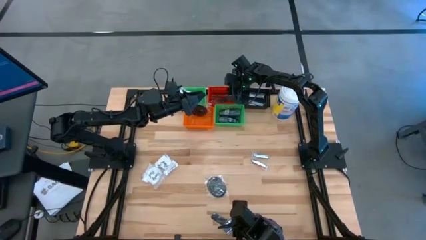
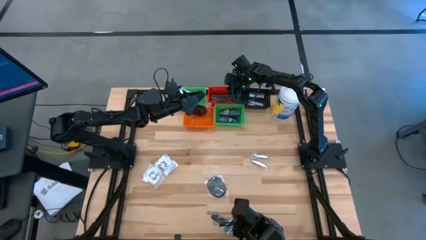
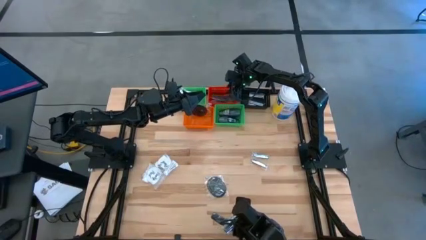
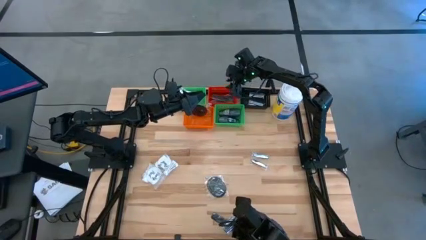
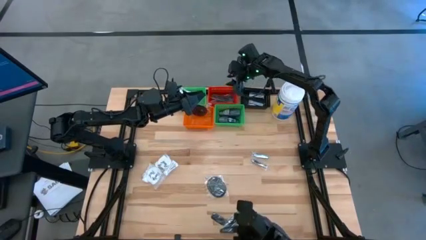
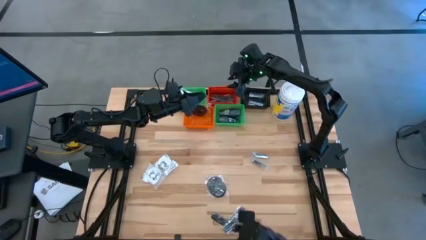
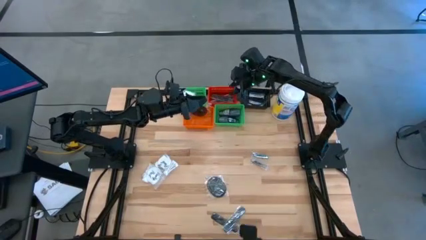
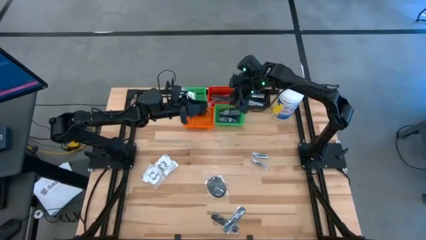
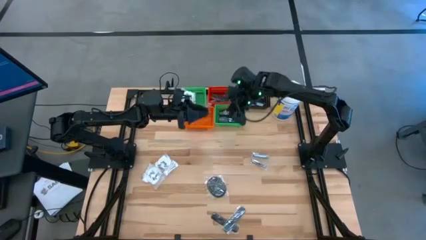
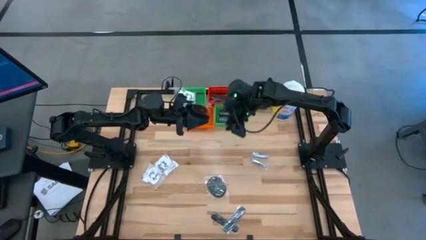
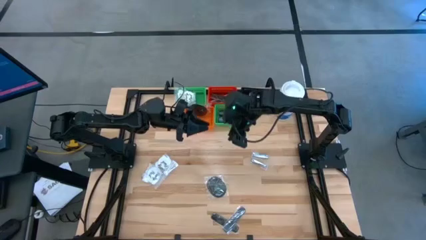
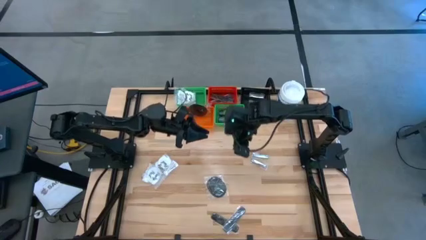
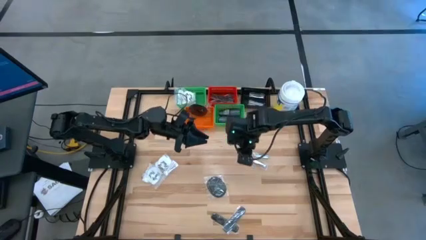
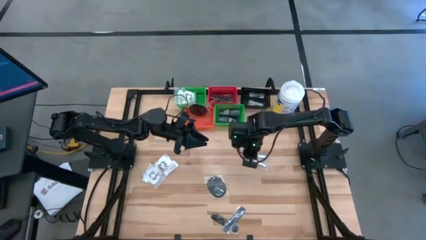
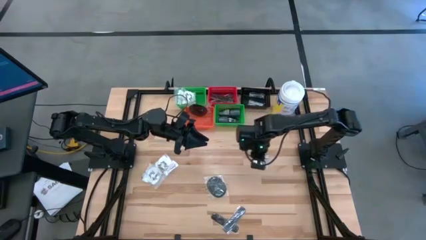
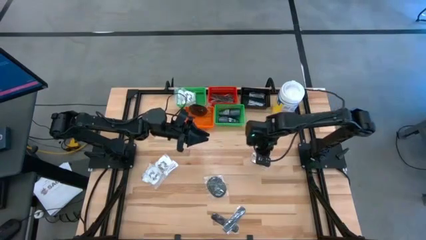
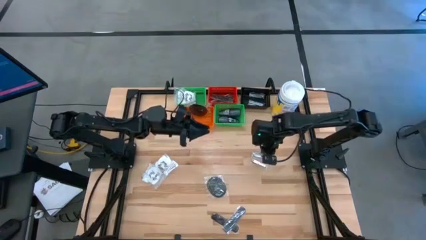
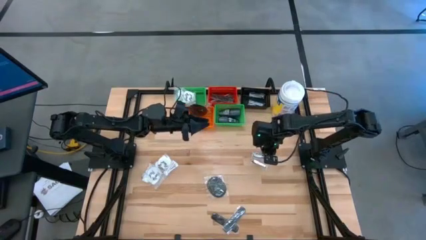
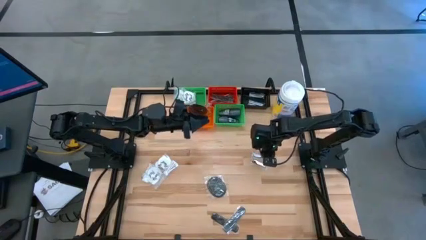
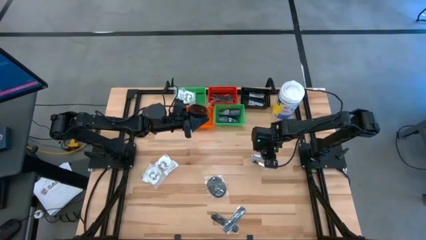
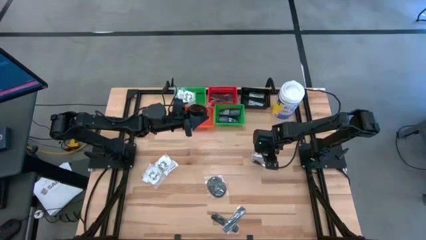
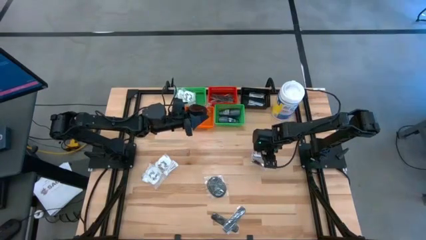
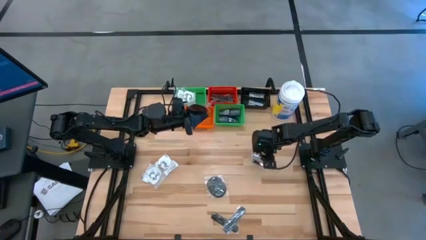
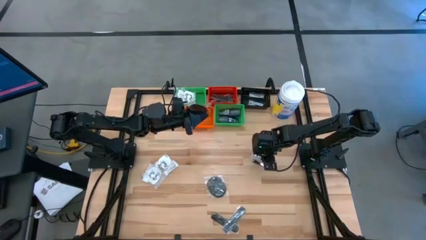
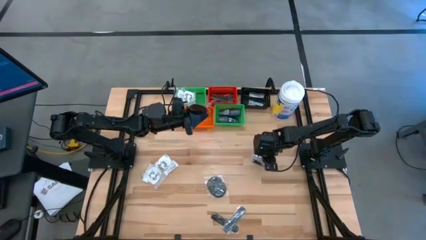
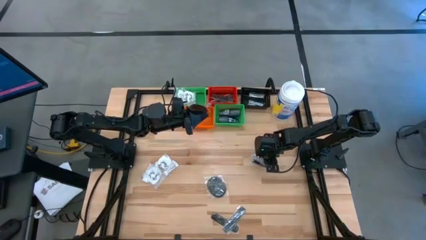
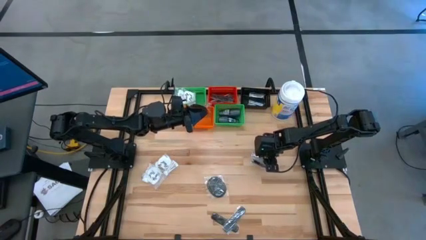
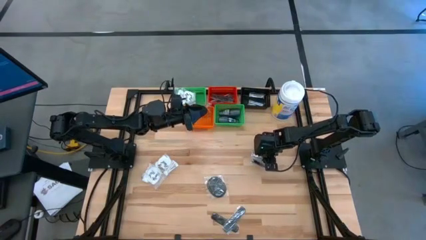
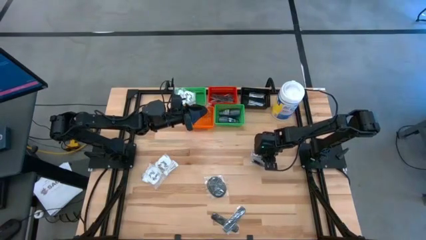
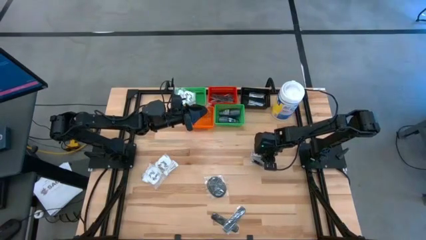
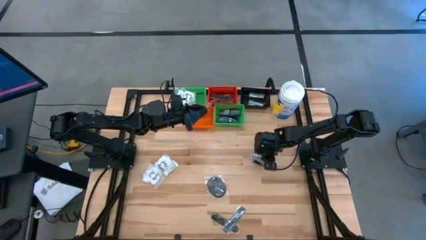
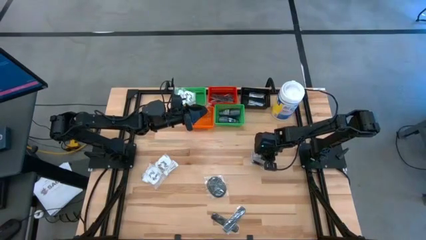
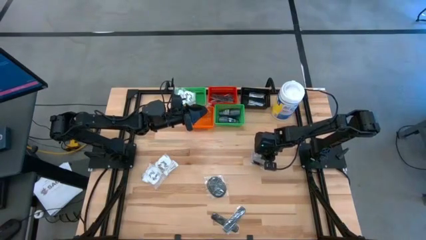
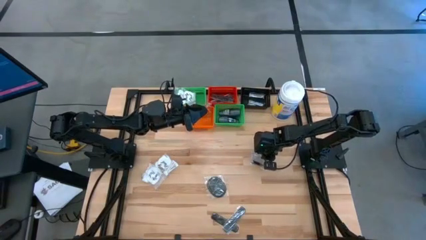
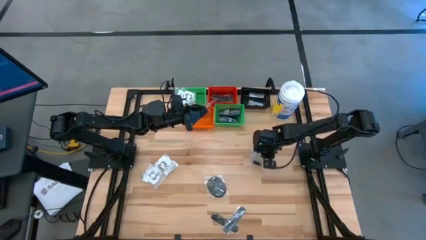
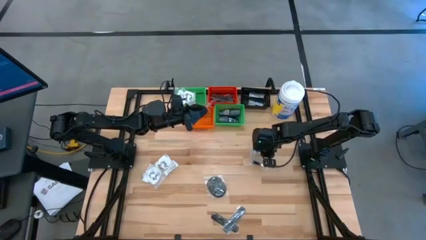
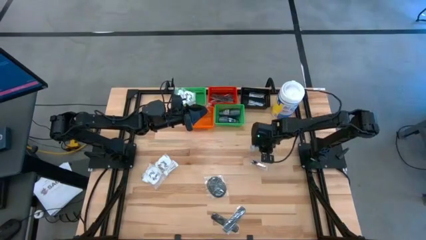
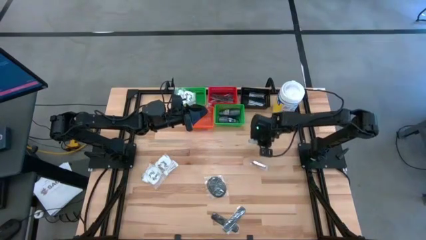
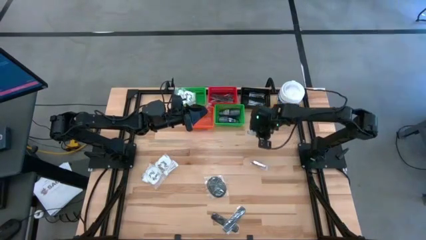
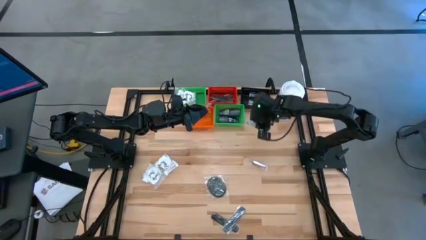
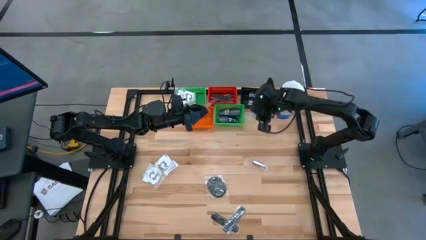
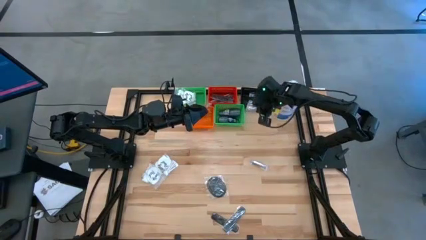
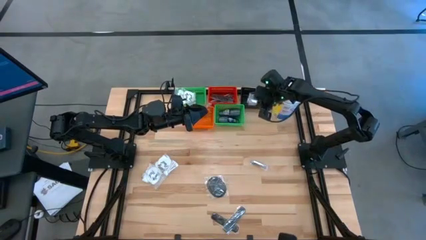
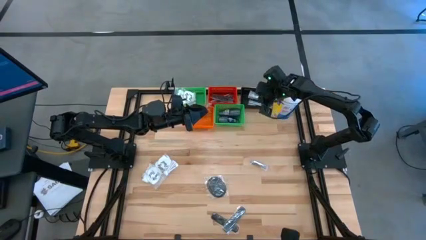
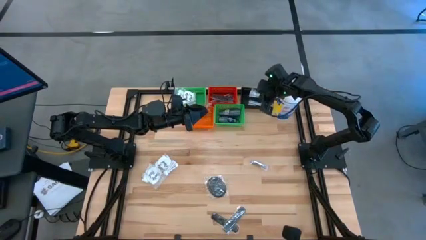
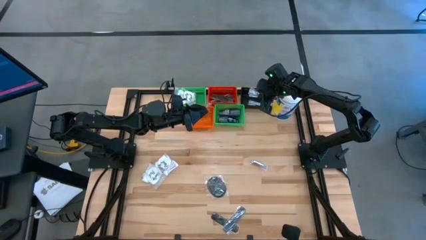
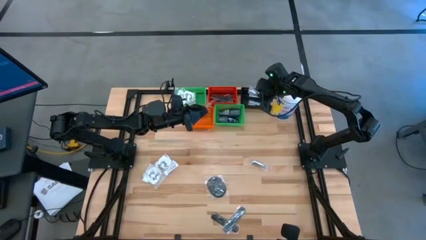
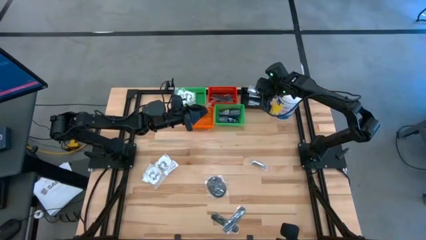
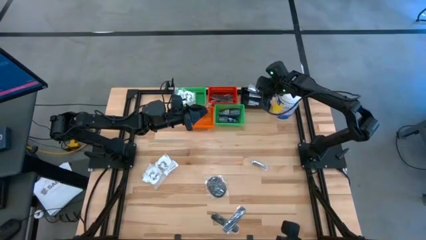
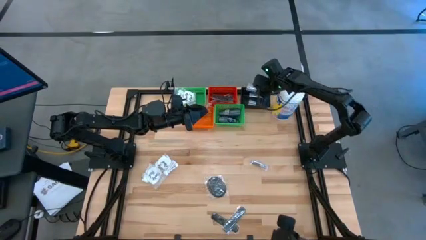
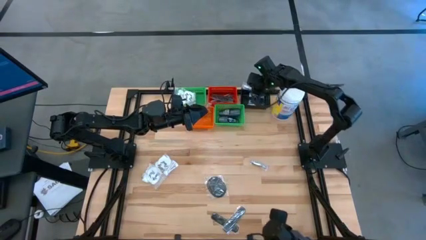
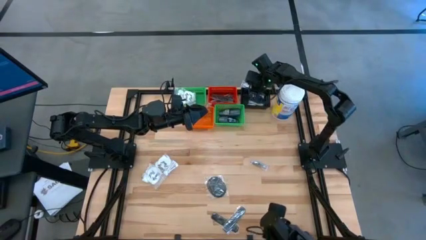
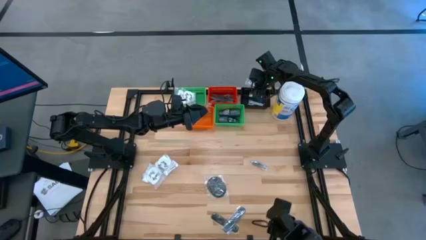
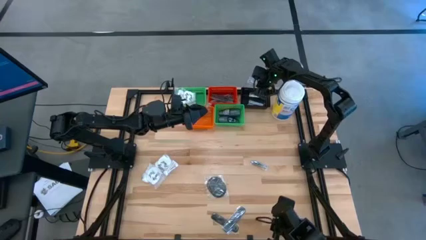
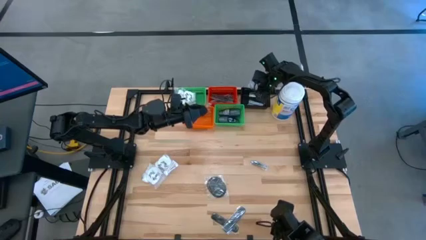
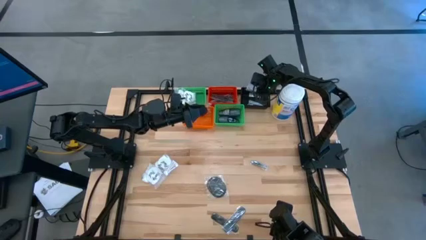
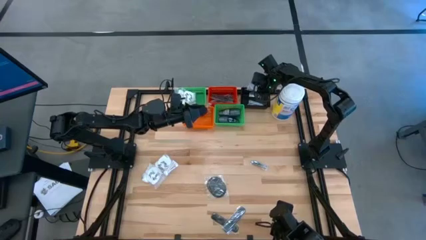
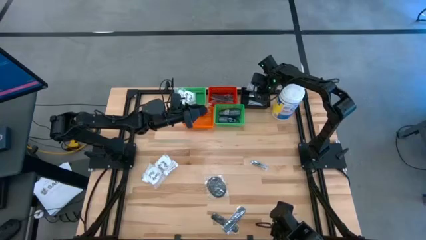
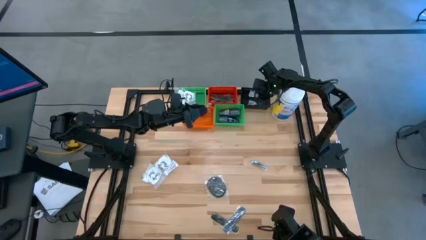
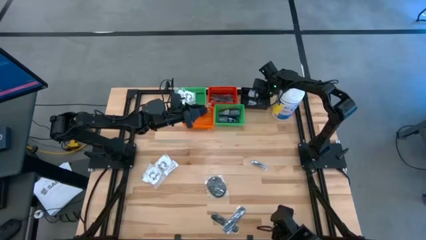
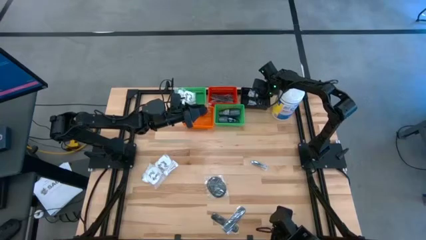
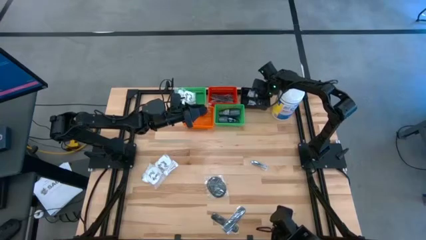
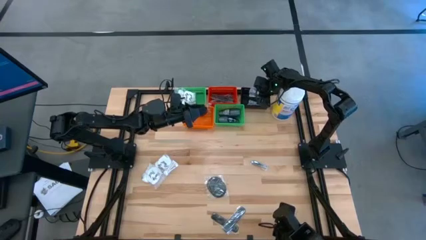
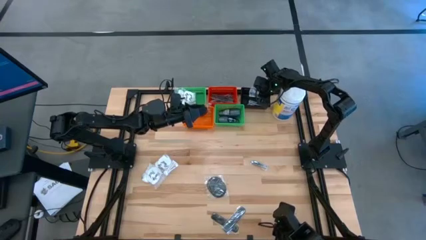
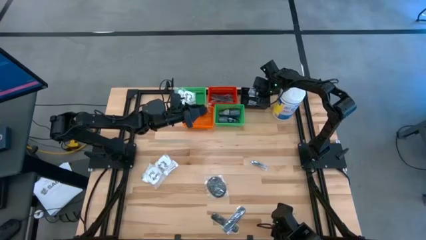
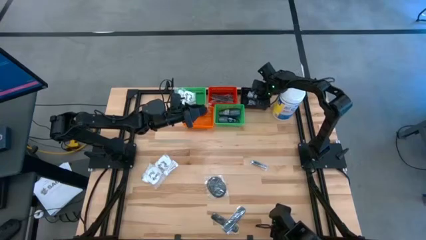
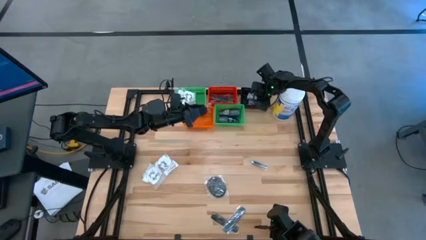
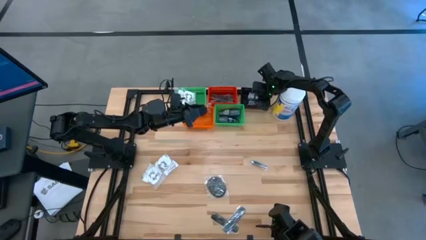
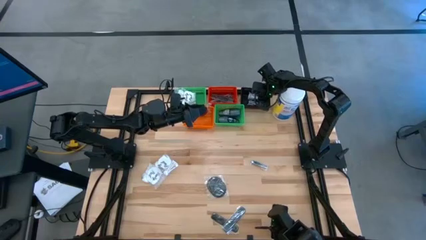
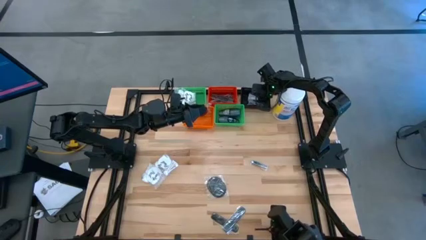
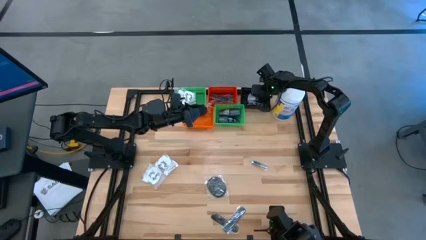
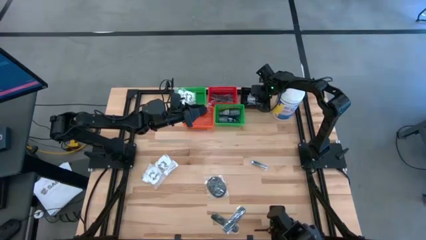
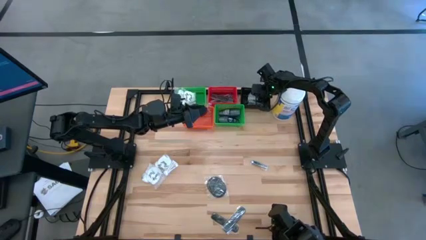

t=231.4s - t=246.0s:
Task: Pick & Place Travel size toiletries
Put the nail cutter into the black bin

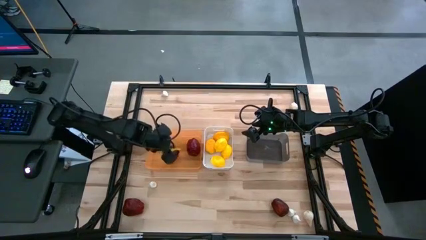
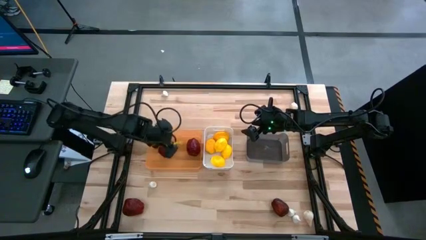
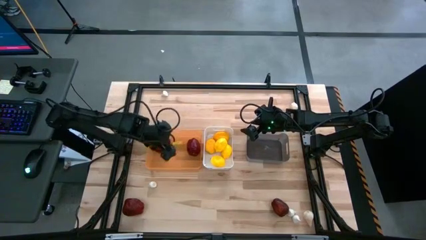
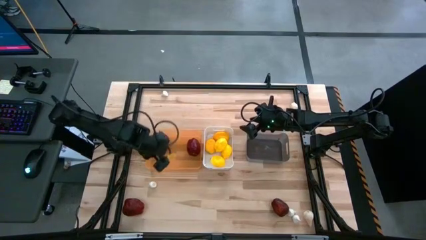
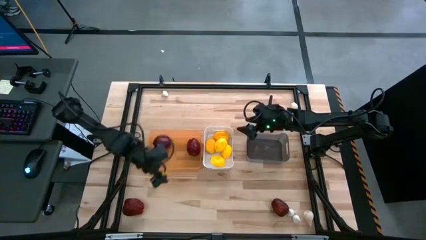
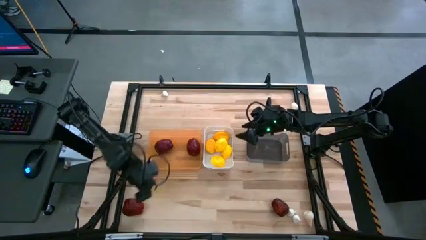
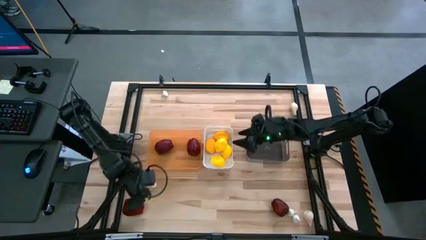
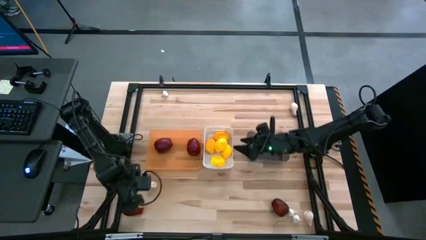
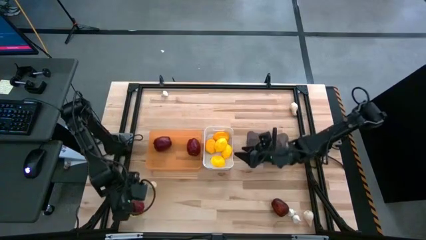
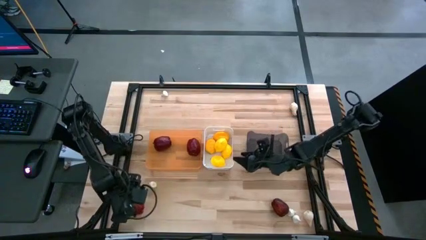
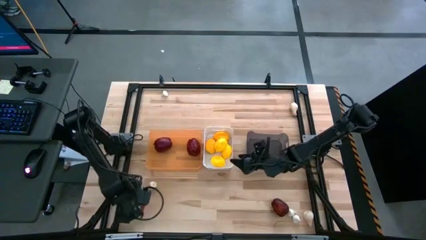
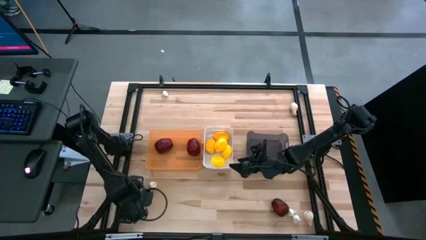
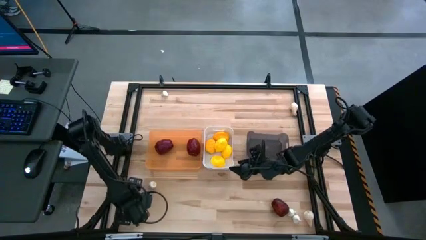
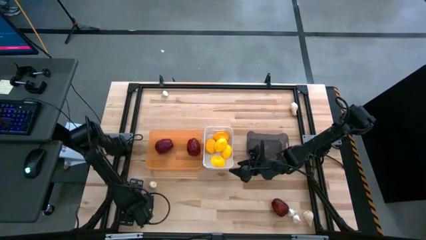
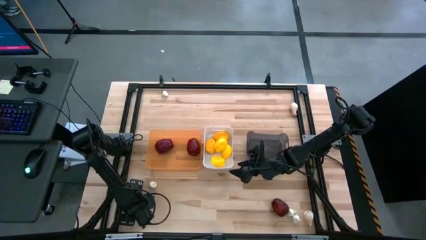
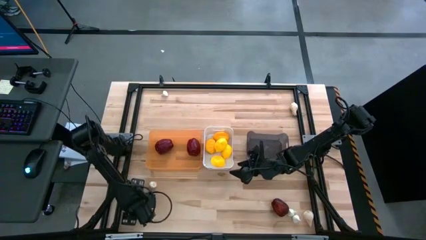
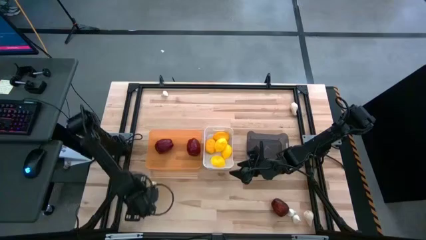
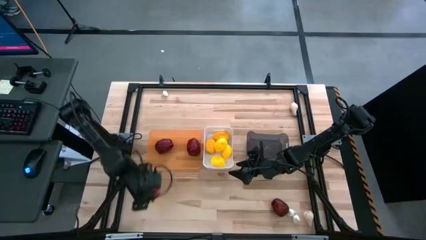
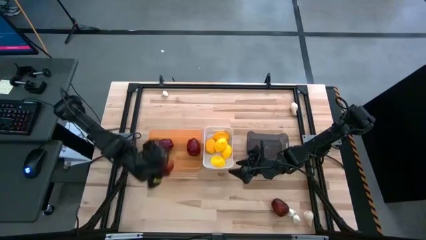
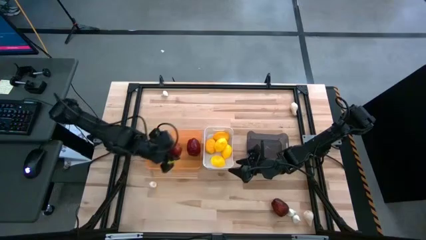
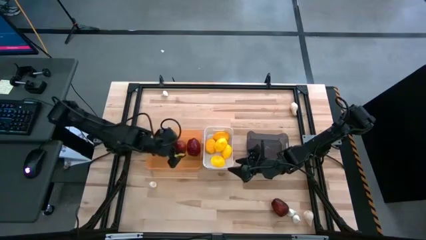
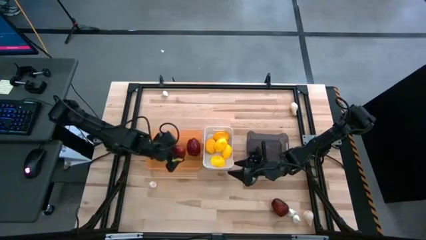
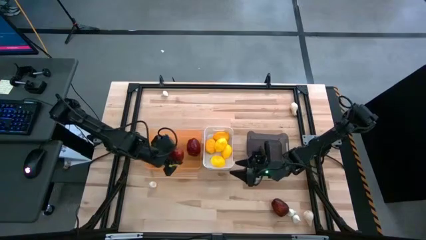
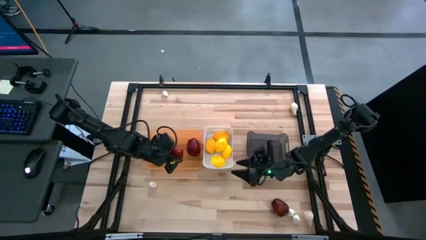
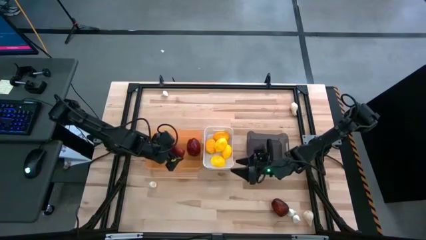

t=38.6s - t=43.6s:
Task: Sort produce into baskets
Put the red apple into the orange bin
